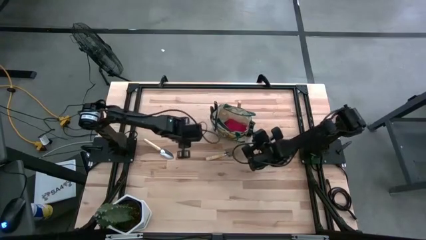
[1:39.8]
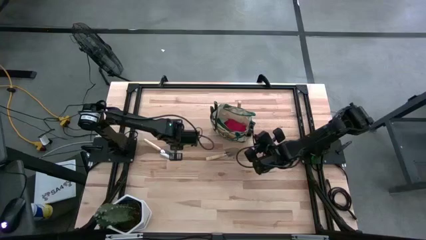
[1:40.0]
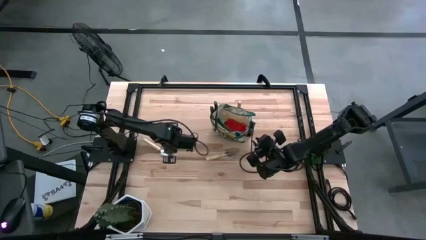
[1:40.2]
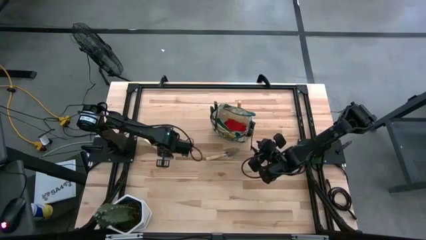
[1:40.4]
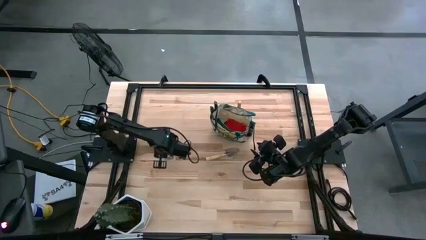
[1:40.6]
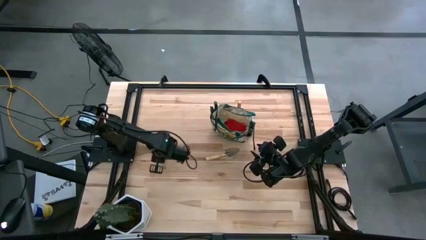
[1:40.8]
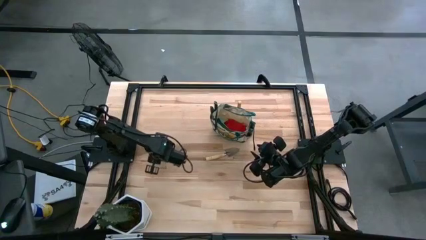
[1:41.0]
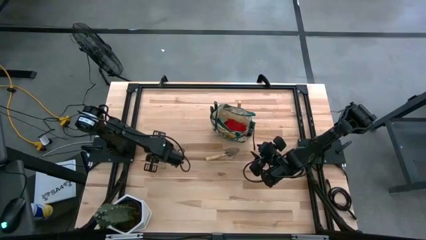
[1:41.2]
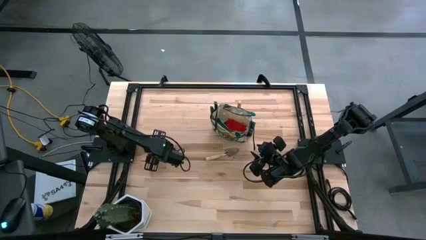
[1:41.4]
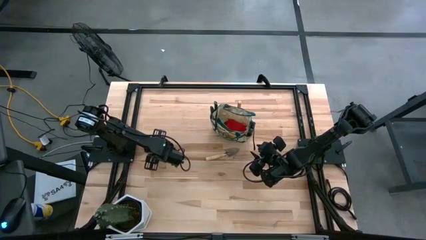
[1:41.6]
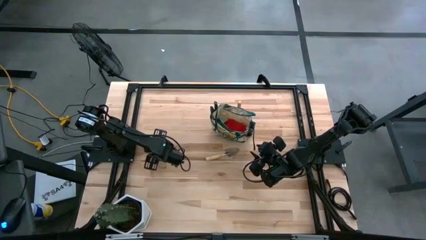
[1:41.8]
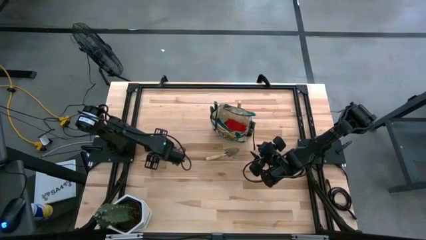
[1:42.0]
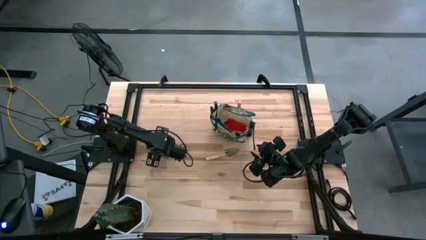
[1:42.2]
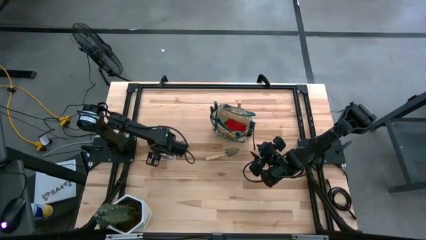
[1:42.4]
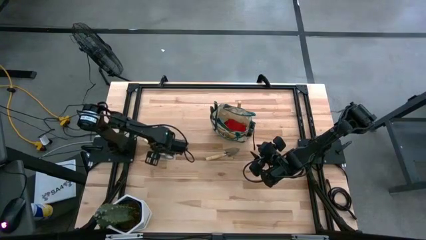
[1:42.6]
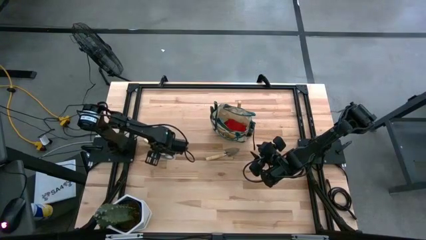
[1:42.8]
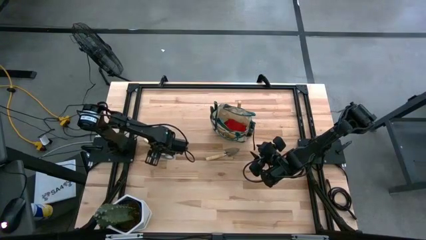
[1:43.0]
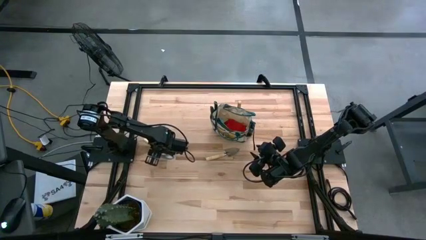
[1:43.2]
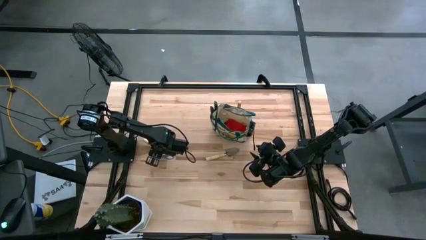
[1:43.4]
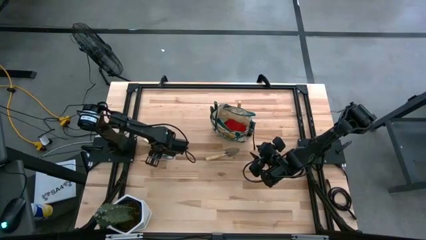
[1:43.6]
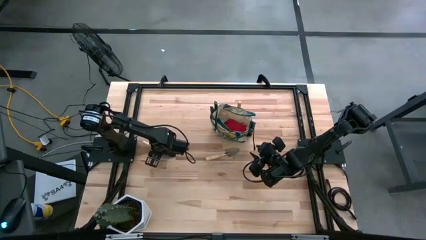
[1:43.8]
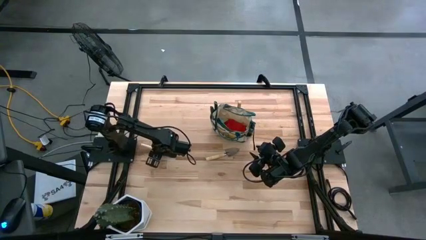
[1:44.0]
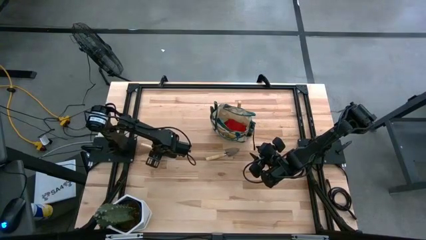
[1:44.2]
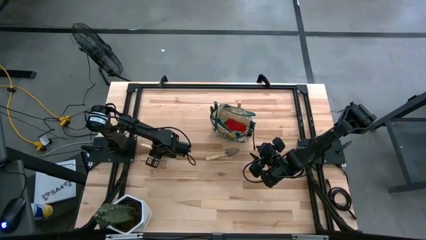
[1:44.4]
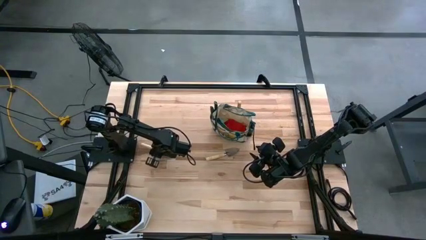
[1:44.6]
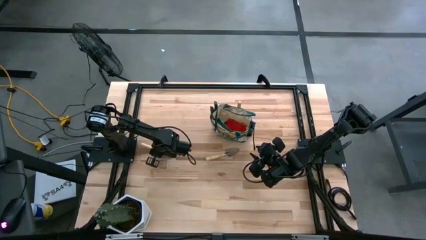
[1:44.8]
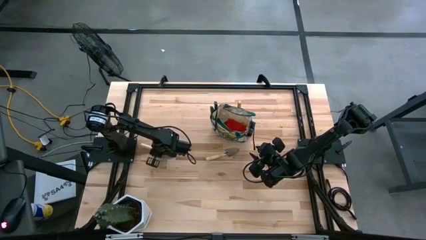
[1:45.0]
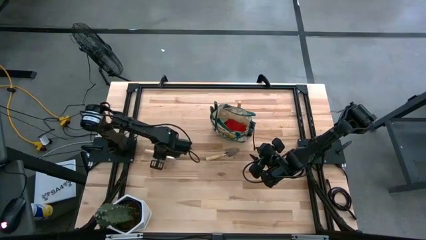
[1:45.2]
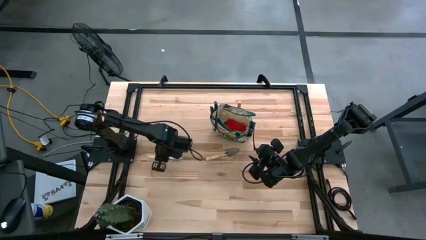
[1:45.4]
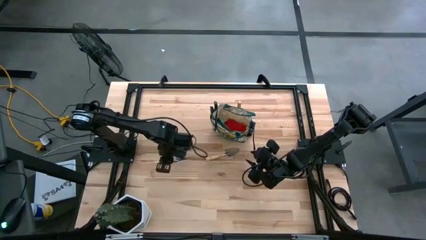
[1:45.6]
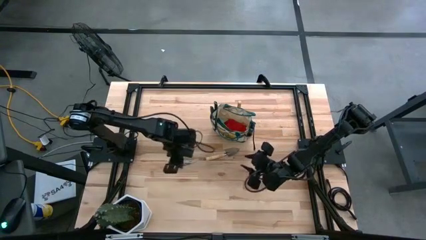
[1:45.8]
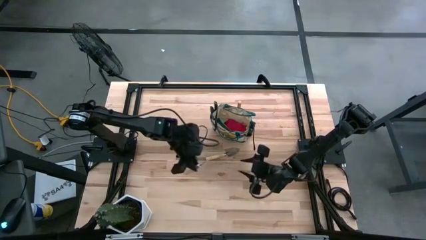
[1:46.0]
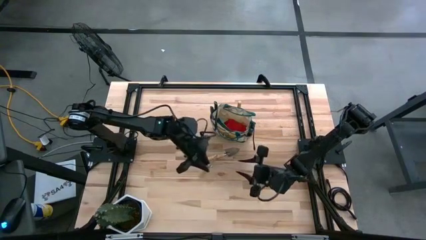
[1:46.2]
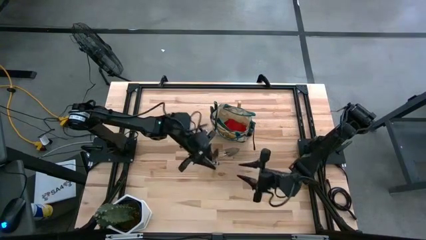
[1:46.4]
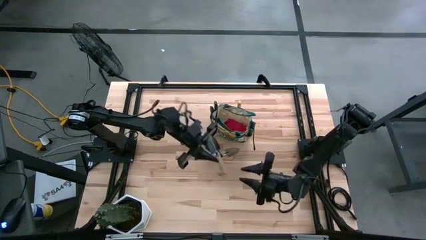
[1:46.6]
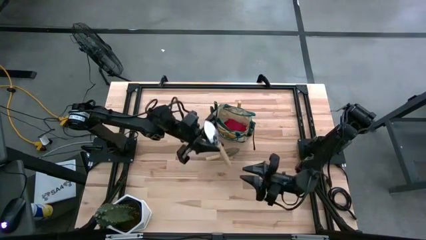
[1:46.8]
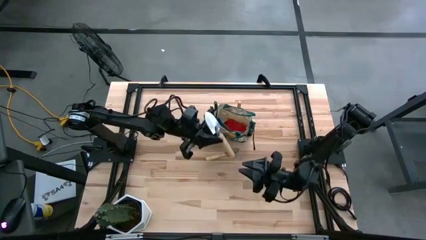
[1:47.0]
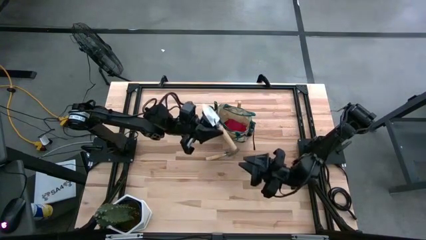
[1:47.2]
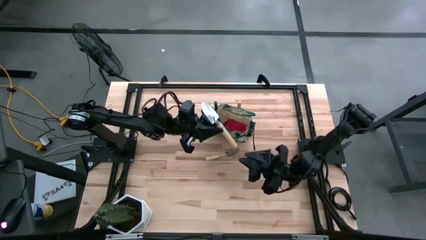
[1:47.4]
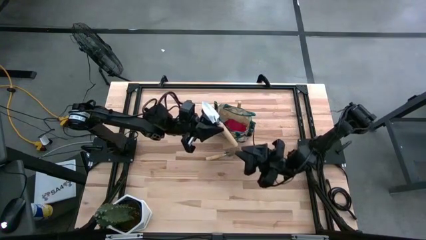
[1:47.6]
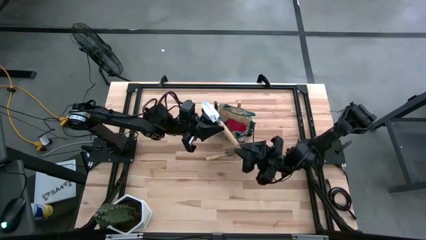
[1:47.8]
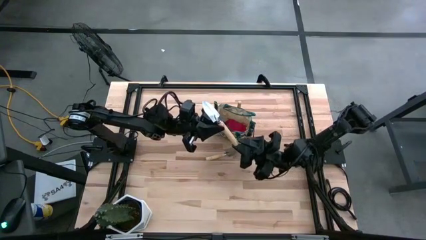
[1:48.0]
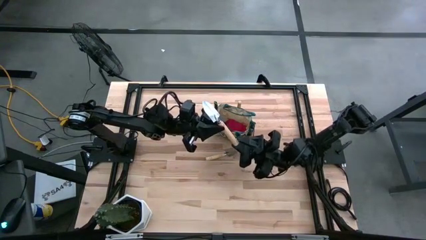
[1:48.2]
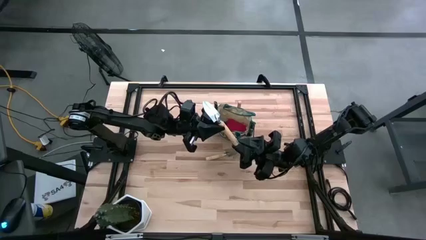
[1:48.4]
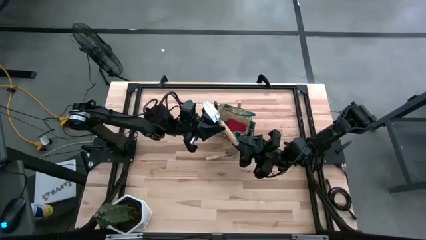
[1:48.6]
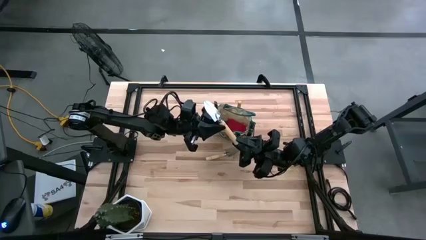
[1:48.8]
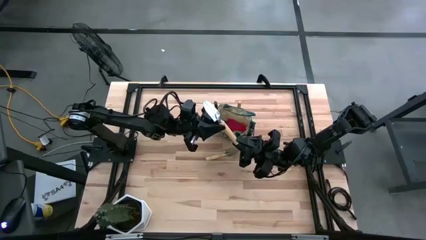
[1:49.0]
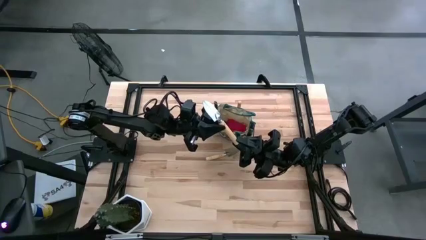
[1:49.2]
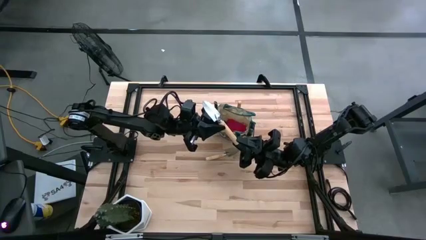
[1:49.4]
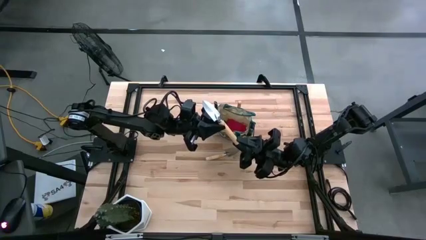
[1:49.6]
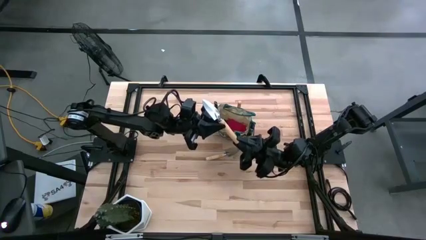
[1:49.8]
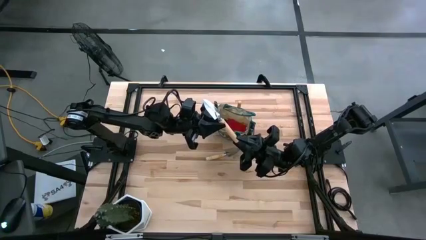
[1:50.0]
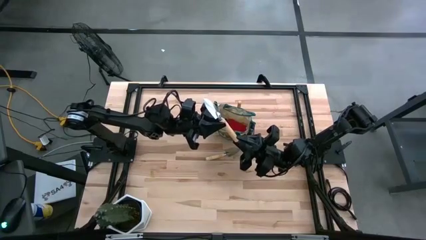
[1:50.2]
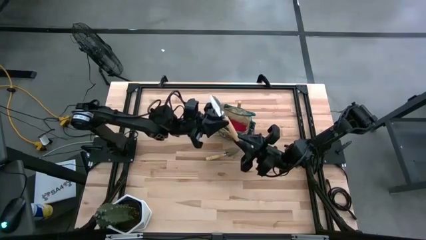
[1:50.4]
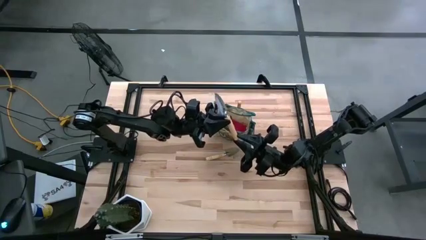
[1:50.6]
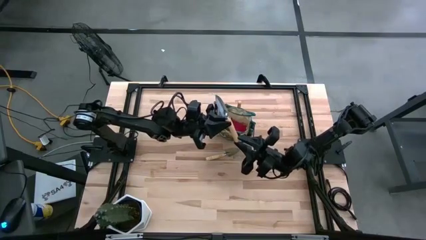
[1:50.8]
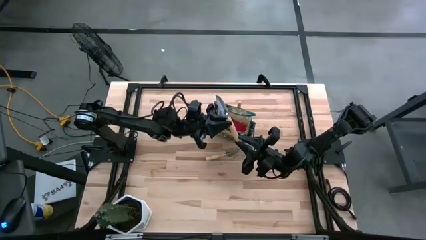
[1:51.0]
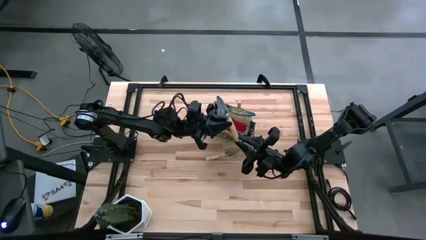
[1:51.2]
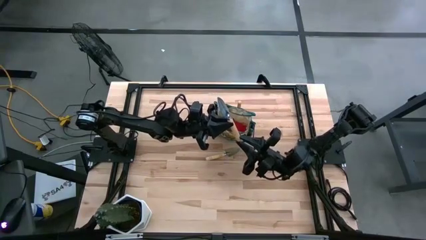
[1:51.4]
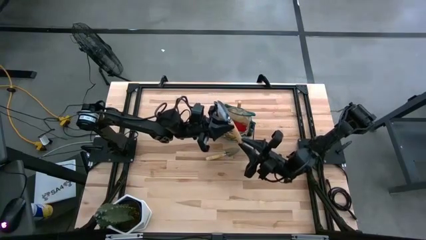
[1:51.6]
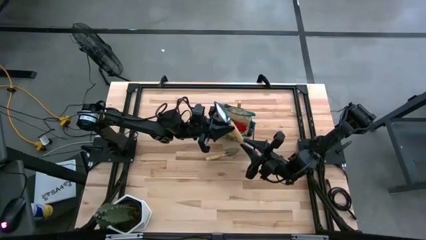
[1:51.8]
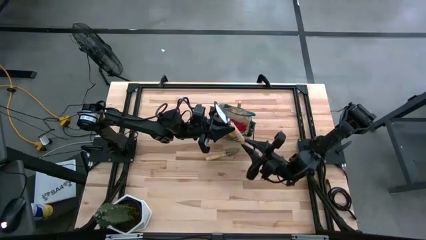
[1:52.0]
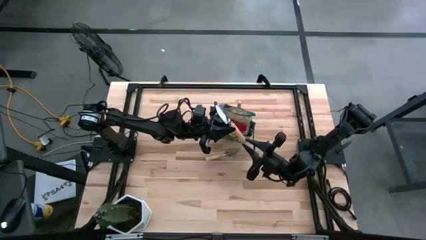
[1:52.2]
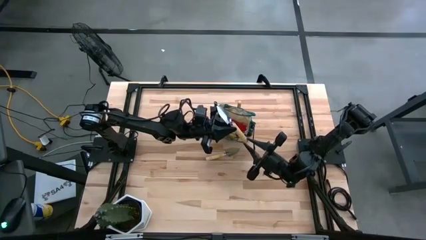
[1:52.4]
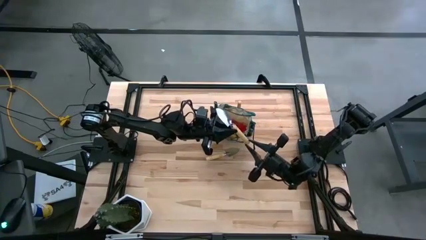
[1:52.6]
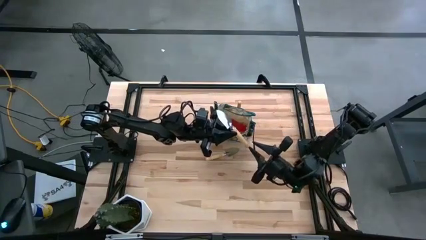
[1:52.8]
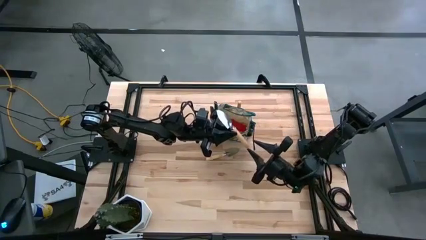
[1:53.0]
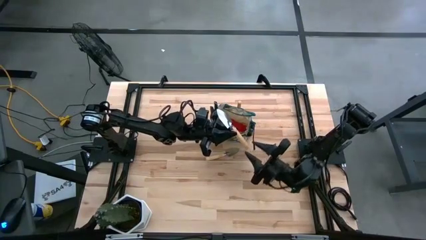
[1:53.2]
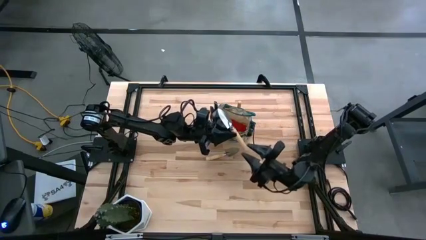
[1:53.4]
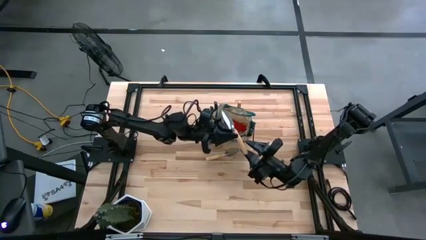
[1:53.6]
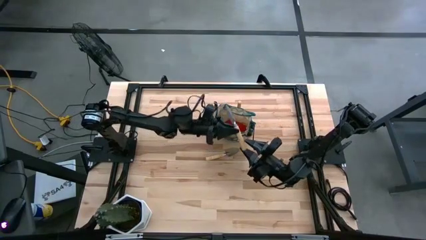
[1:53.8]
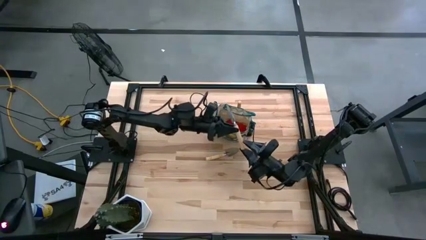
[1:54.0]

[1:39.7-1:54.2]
Task: Pick & Place Garden tools in Gardening bag
Put the left brown trowel into the gardening bag

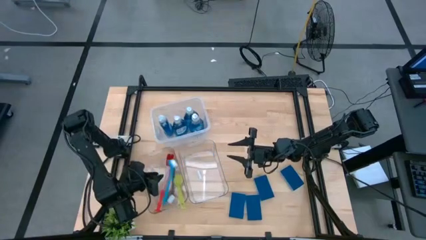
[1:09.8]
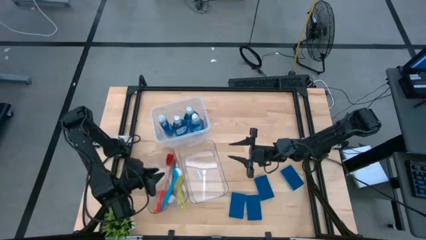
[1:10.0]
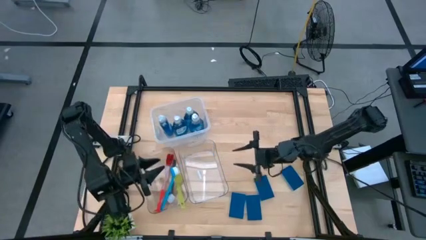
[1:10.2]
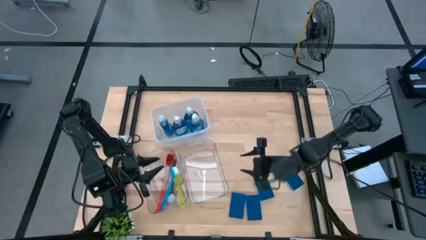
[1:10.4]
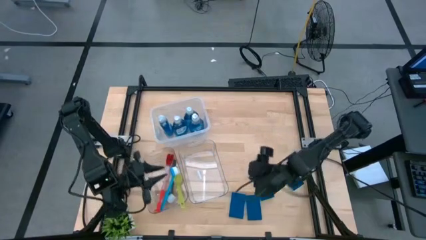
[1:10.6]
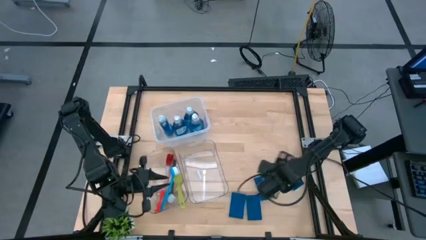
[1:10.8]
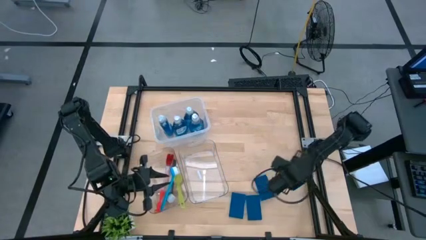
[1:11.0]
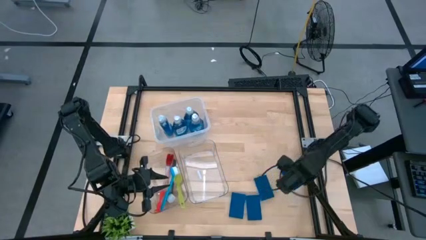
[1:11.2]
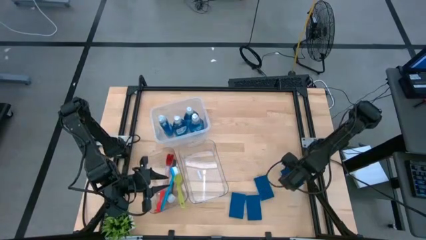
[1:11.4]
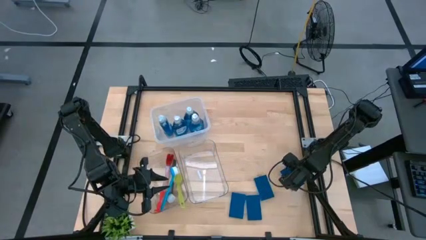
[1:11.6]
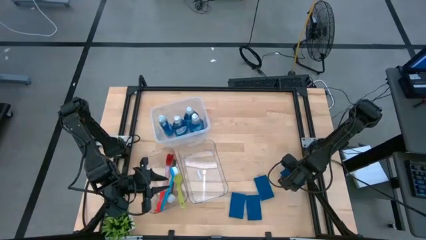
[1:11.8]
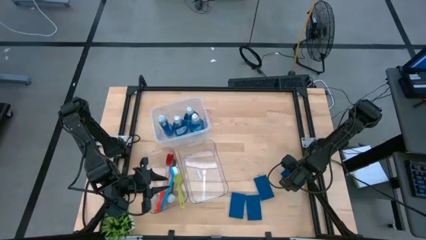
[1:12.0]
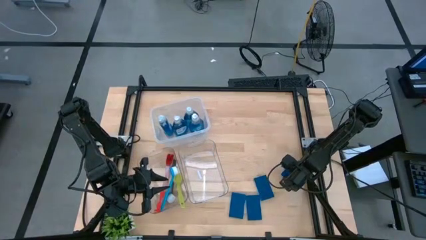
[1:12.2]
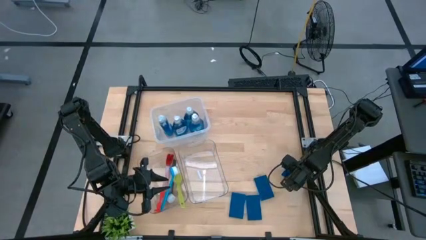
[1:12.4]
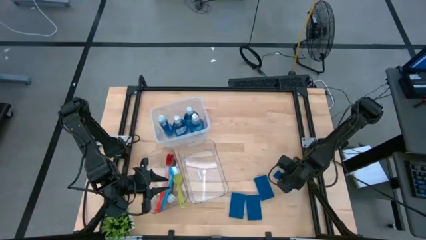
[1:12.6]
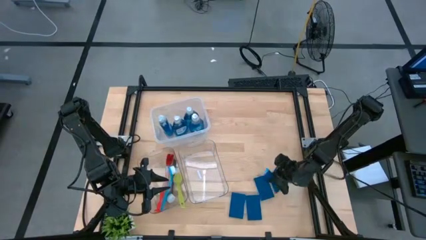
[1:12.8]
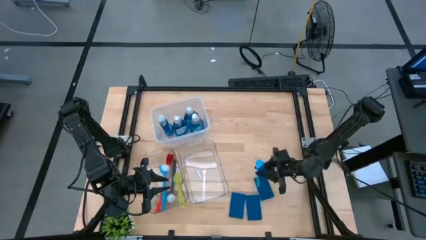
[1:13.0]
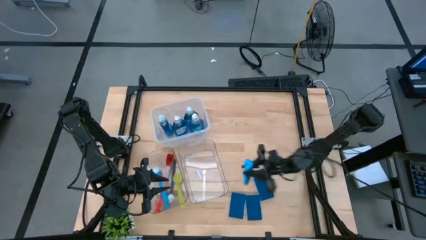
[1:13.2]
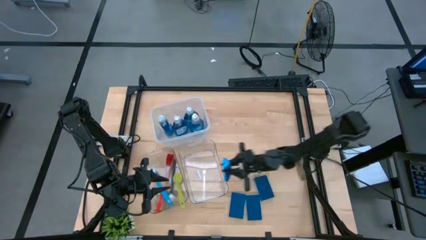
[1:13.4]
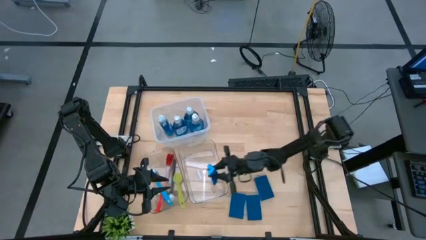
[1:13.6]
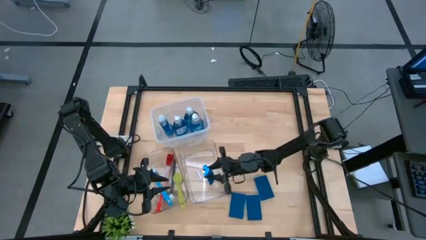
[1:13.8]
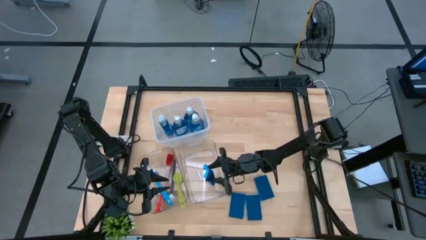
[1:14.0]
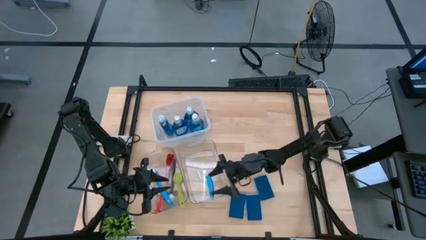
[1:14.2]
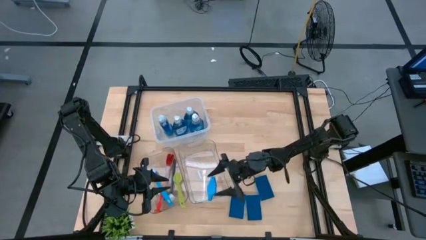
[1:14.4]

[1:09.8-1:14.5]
Task: Pick & Place Kitchen Sink Supplies
Put the blue sponge wipe into the right transparent bin
